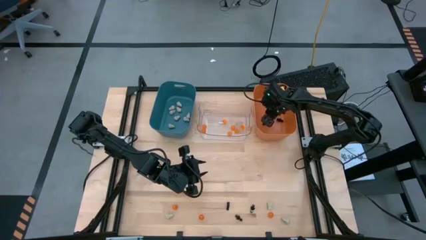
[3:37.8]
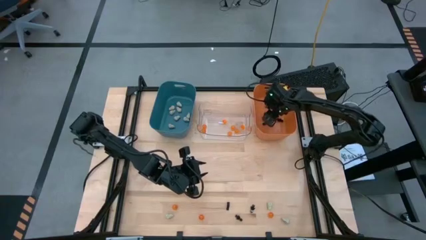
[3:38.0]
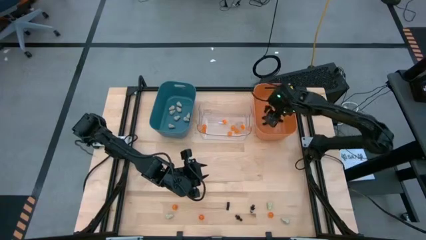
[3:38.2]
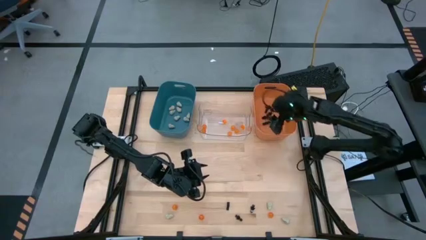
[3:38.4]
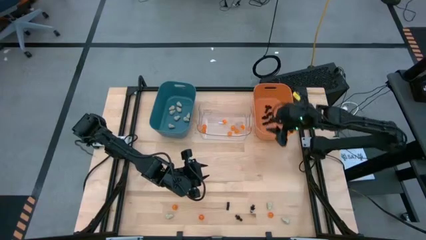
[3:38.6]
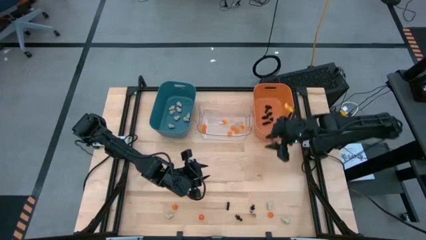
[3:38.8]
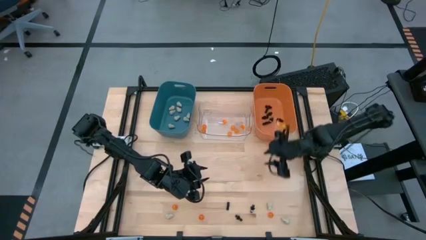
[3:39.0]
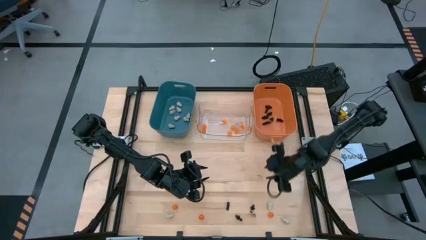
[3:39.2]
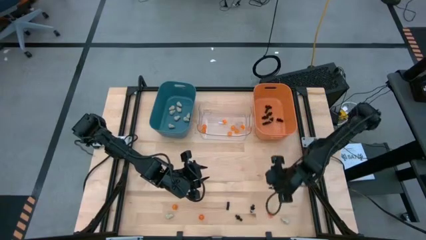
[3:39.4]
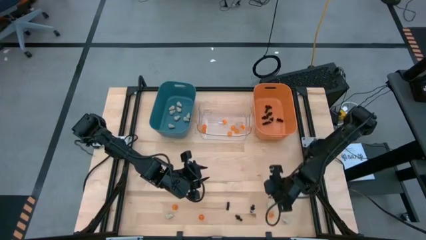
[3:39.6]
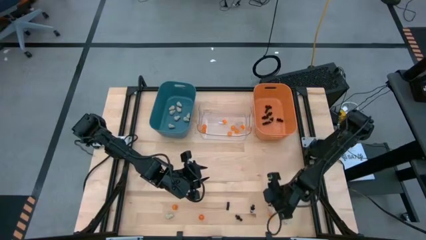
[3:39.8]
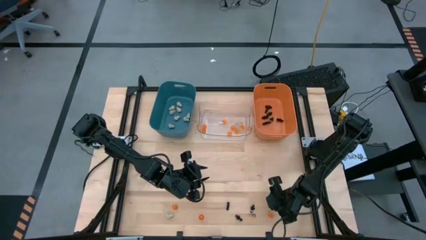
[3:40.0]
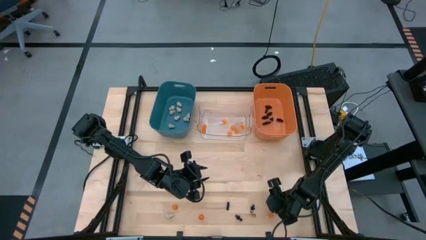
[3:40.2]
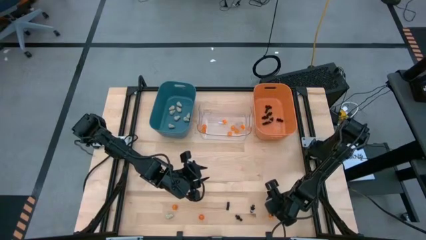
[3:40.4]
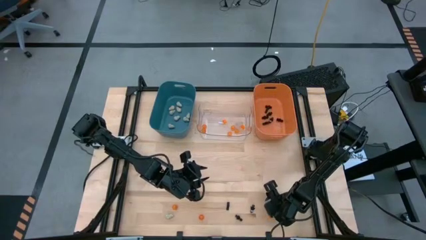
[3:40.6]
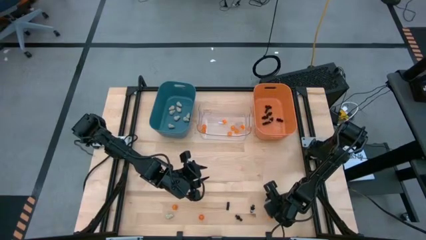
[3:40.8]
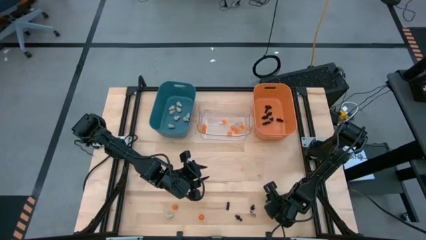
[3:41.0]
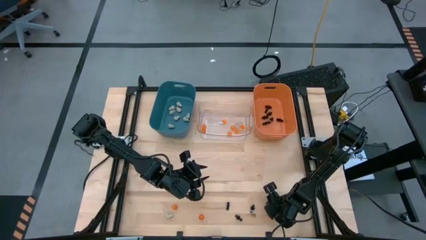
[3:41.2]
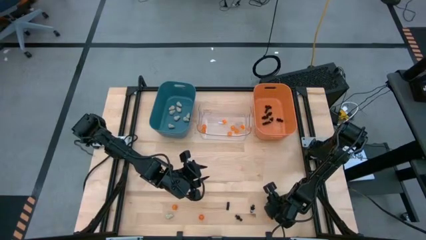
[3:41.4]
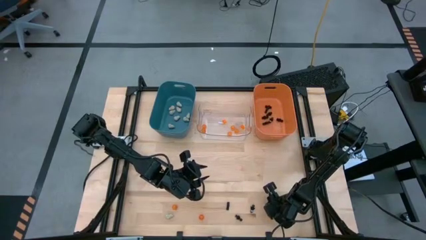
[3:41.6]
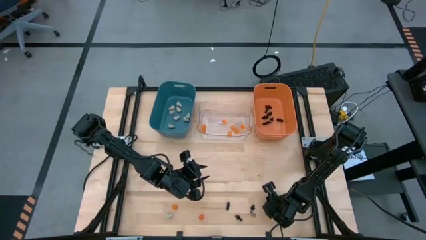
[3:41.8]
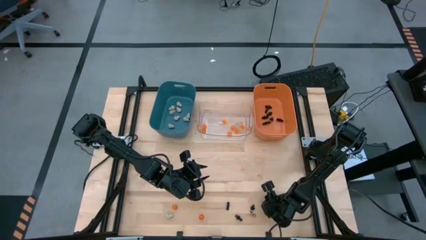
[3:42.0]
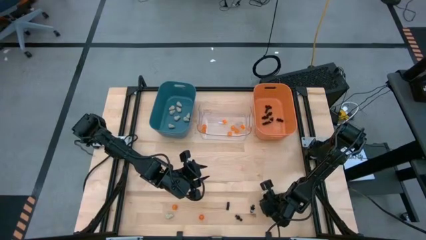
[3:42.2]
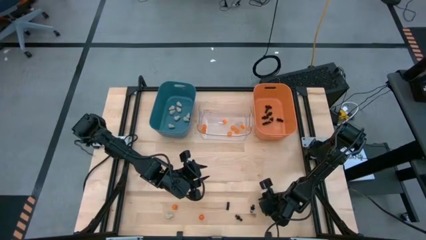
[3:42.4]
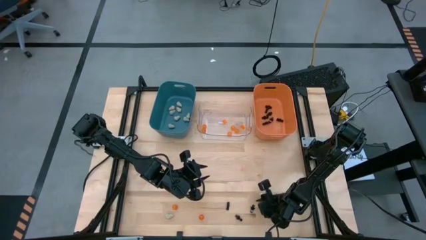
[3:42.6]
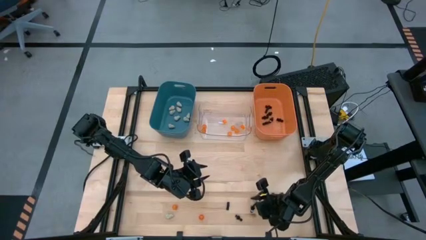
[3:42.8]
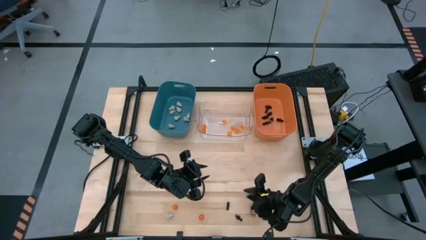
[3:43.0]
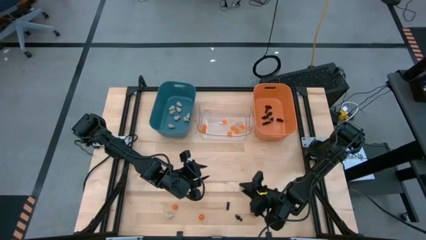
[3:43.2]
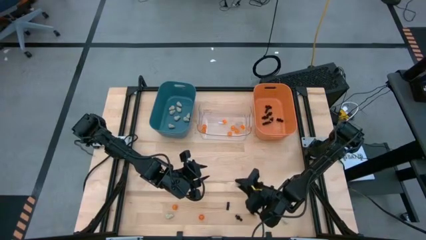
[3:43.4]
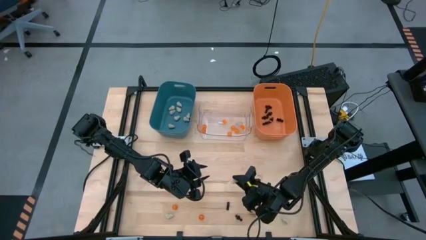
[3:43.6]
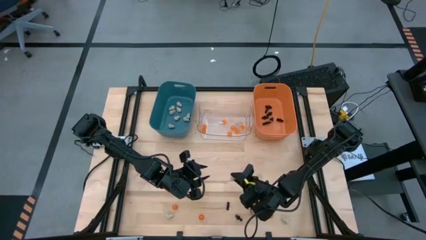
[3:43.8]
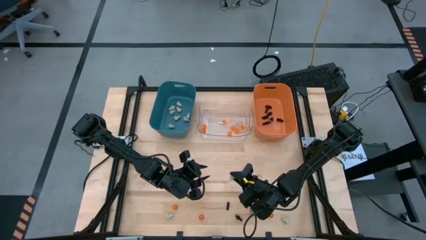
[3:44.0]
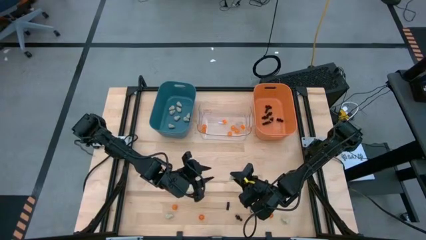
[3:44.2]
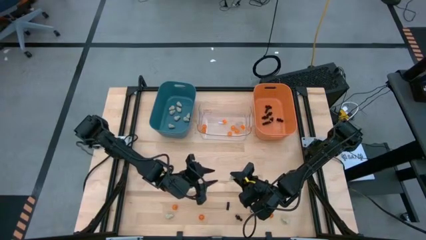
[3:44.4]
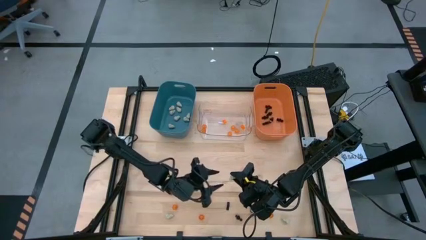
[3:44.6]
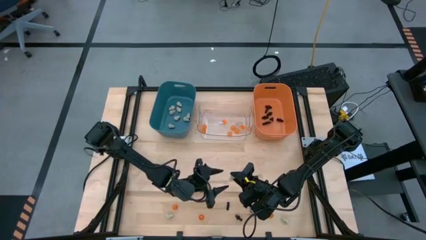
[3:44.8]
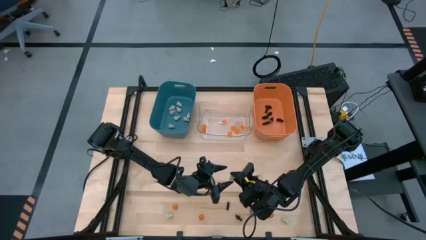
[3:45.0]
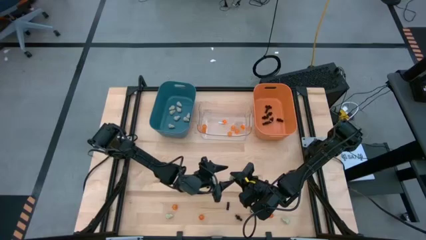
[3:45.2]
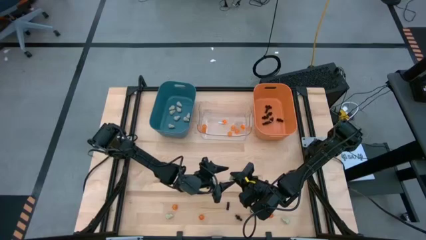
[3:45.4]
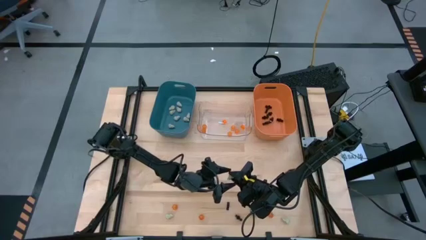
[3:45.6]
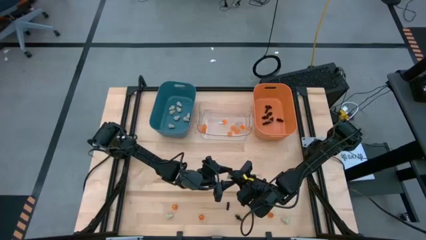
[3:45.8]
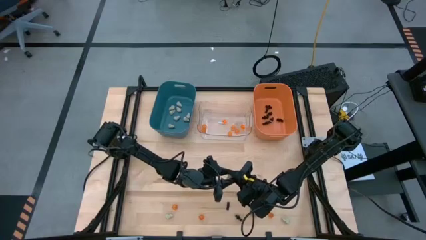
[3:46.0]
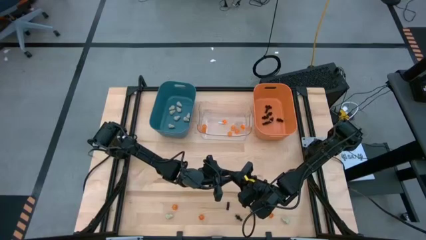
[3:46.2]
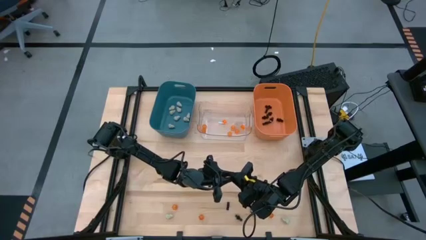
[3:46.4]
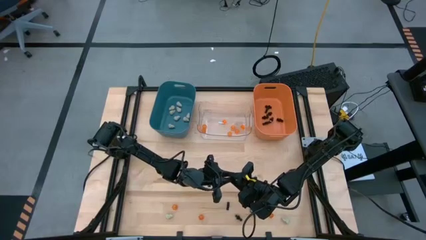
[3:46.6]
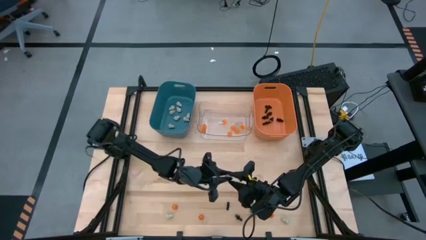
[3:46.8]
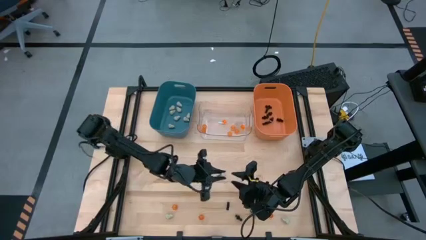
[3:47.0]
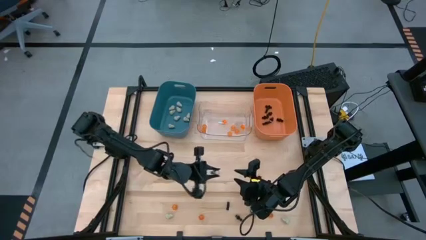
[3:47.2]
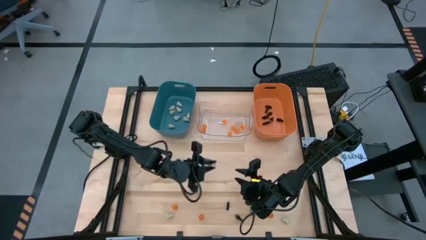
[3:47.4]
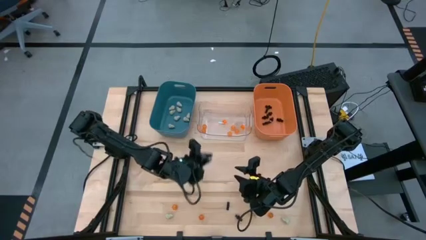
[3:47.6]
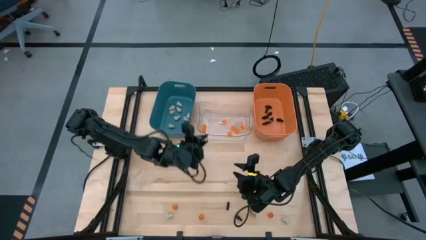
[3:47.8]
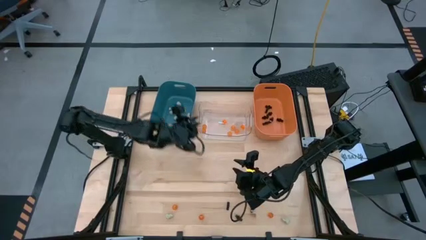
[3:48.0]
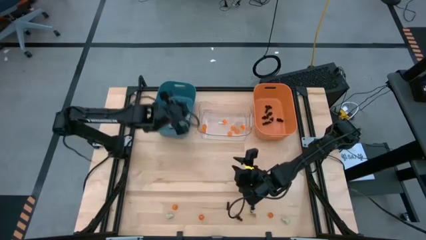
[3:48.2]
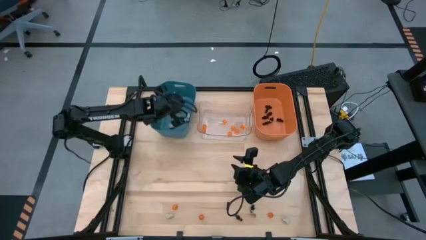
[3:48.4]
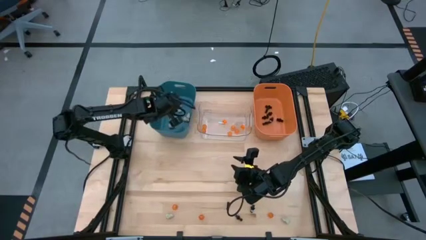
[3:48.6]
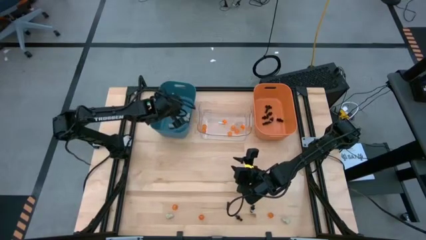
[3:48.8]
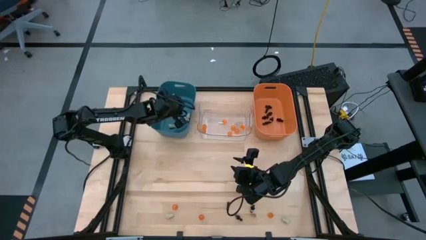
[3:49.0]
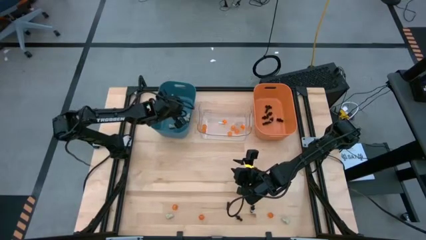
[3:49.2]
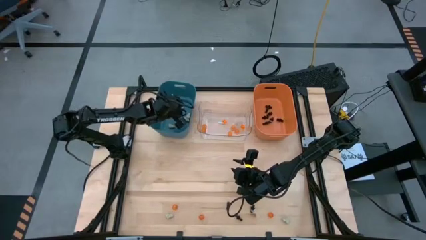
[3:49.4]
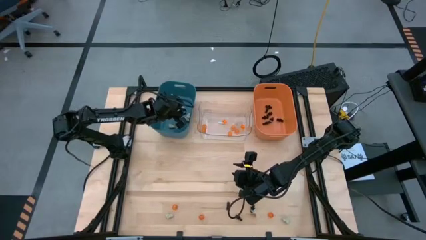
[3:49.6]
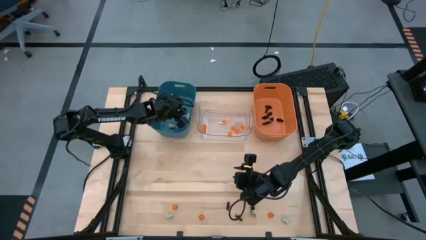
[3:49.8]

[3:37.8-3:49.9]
Task: Sort Halloween decoration
Put the white skull toy into the blue bin

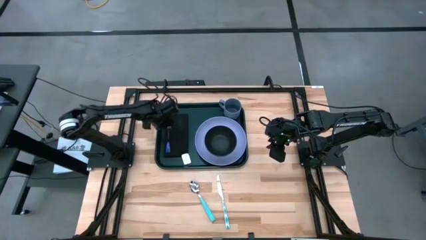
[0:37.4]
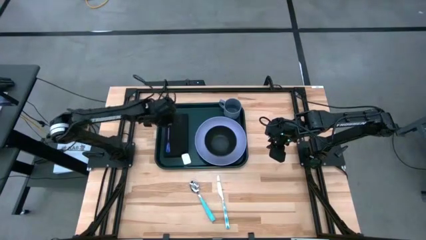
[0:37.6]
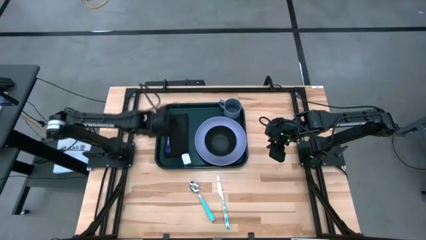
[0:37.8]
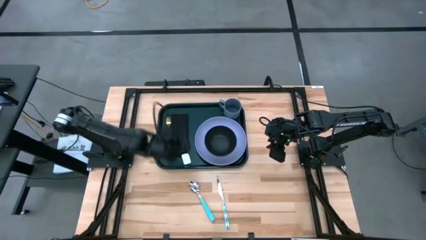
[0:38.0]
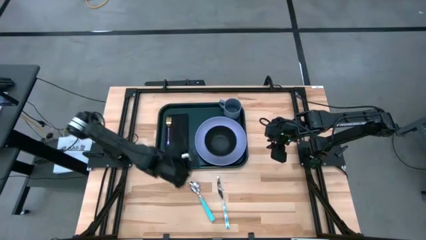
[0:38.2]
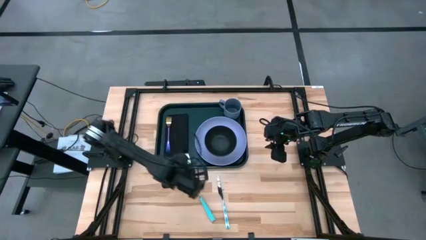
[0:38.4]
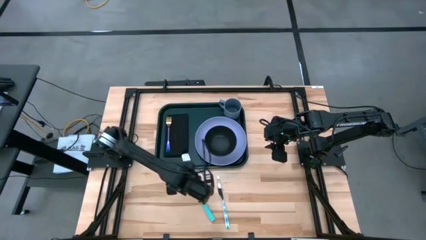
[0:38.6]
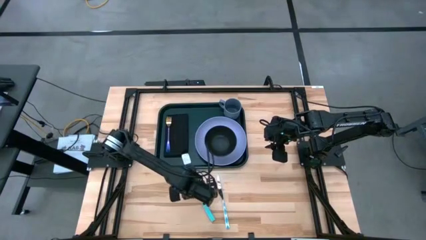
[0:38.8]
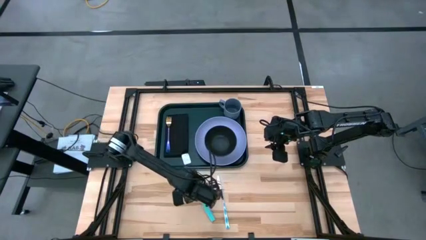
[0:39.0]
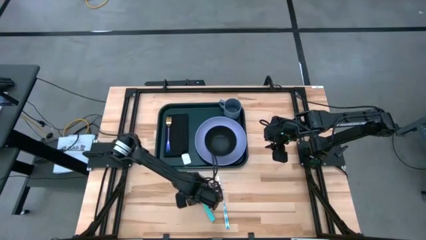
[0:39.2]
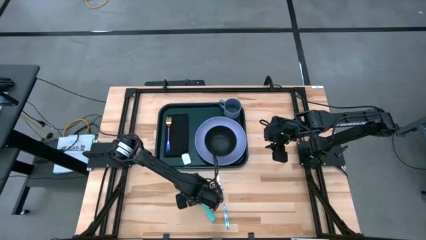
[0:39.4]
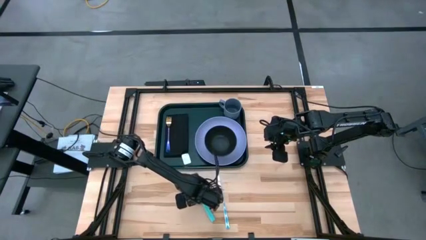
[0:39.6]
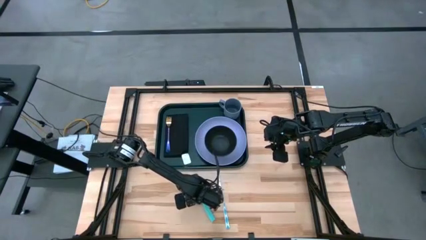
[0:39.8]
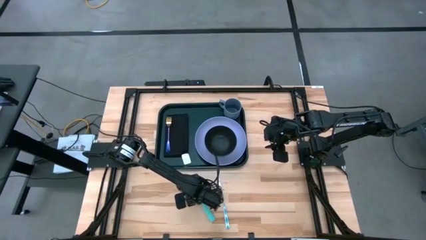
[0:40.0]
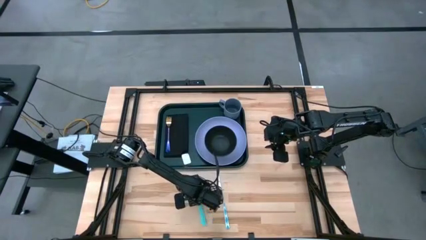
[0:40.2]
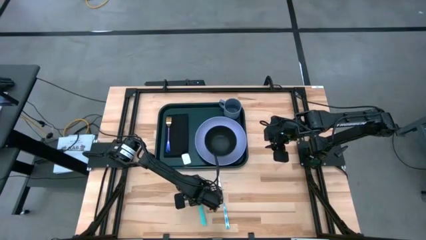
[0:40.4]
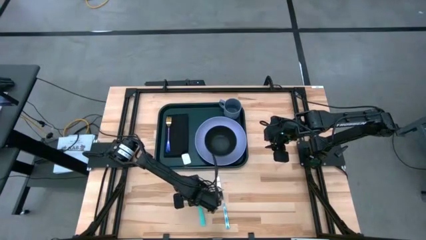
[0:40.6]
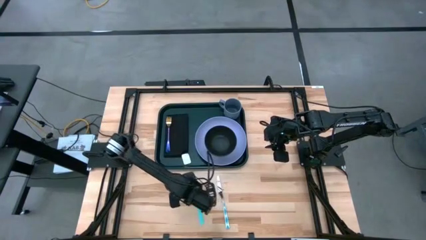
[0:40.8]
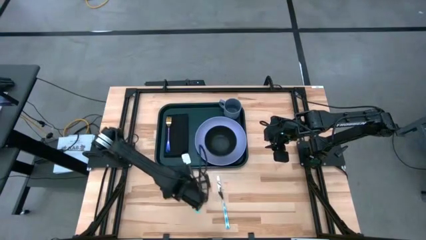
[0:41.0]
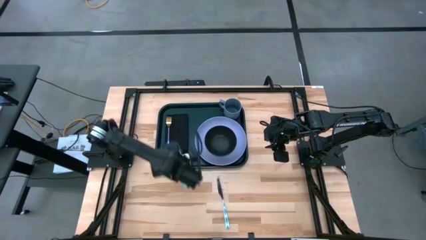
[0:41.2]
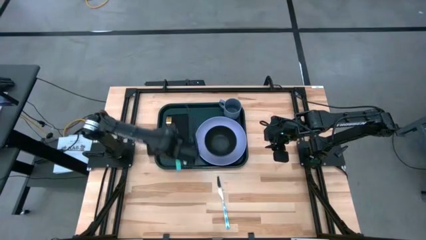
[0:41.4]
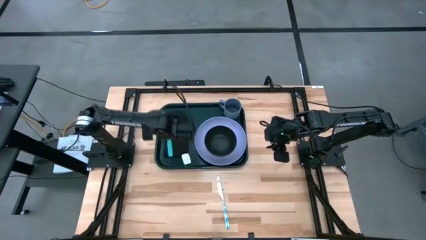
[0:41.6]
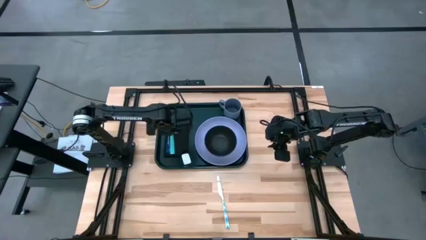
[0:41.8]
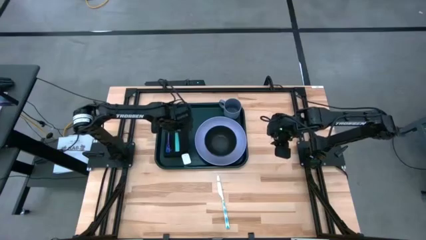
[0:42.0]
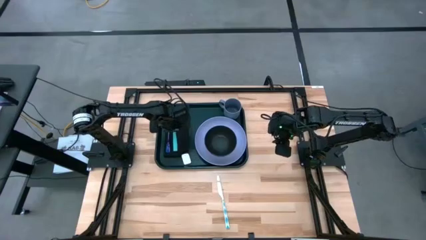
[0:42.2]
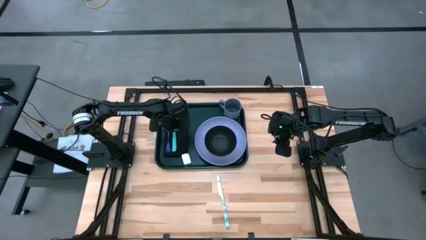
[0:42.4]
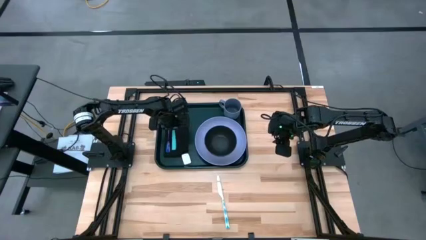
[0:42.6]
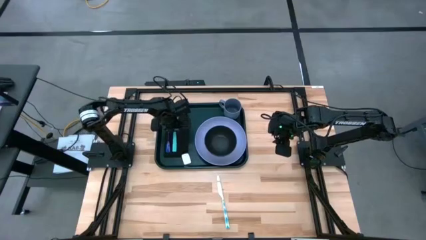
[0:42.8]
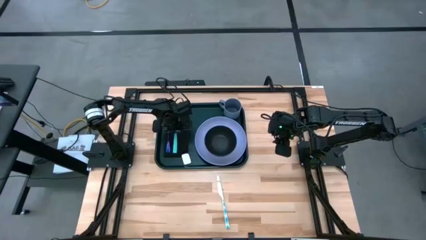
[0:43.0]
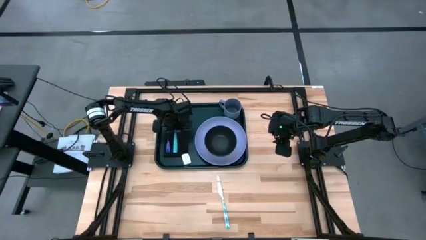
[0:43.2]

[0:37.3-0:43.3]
Task: Set up tray
Put the blue spoon to the right of the purple fork on top of the napkin
